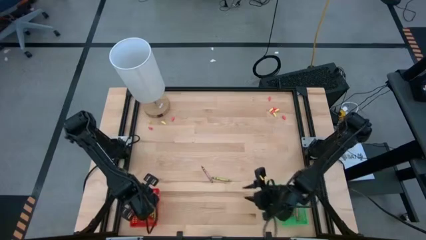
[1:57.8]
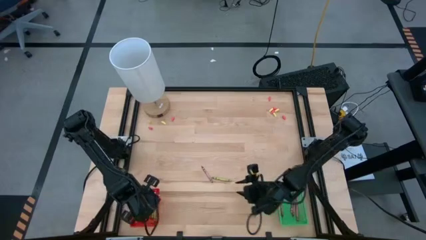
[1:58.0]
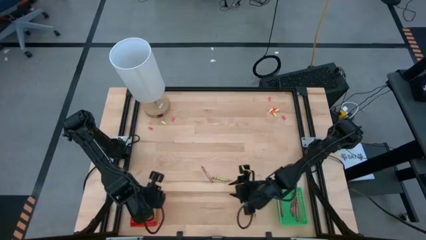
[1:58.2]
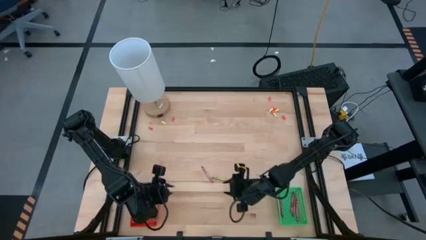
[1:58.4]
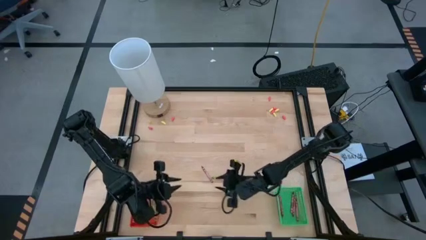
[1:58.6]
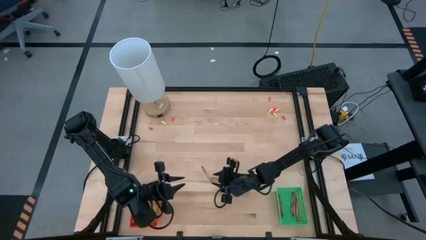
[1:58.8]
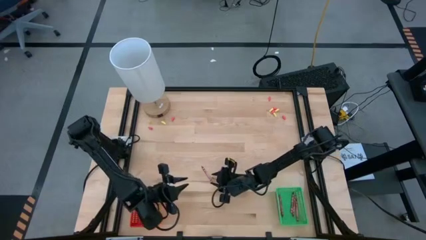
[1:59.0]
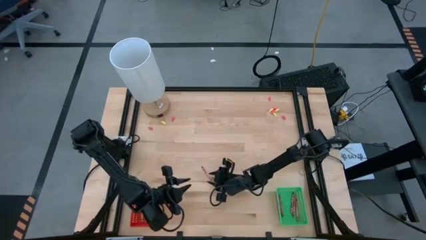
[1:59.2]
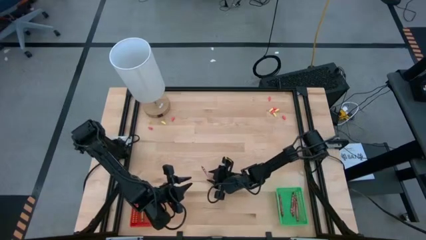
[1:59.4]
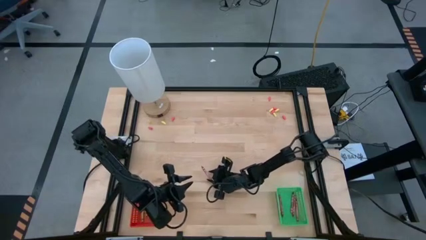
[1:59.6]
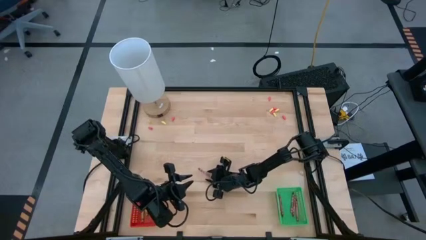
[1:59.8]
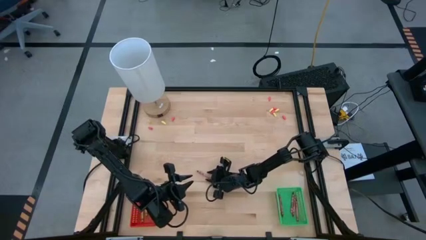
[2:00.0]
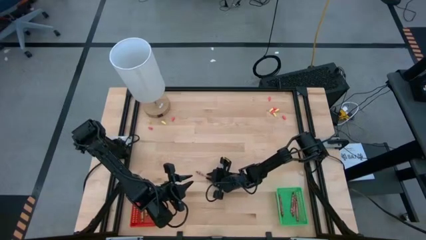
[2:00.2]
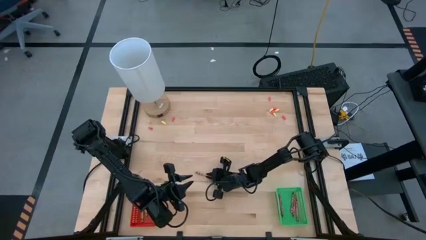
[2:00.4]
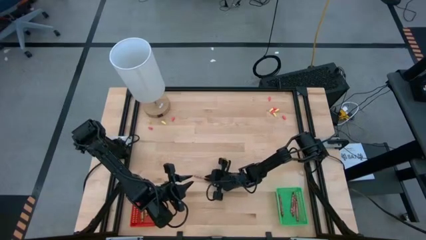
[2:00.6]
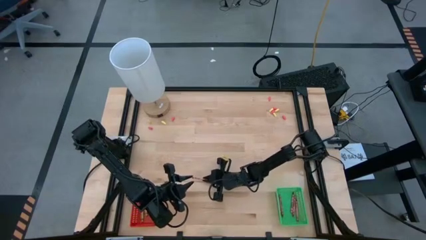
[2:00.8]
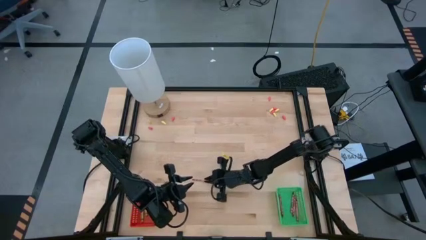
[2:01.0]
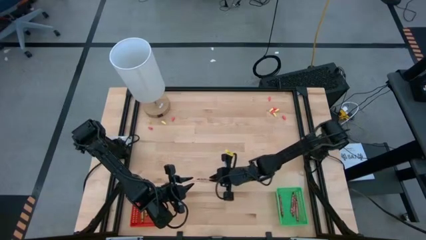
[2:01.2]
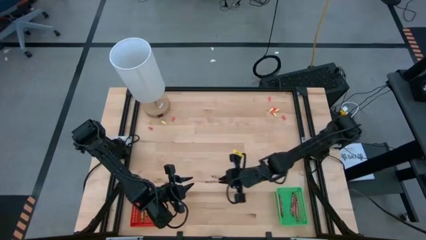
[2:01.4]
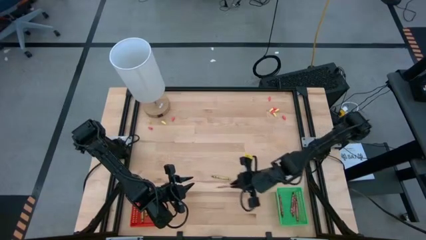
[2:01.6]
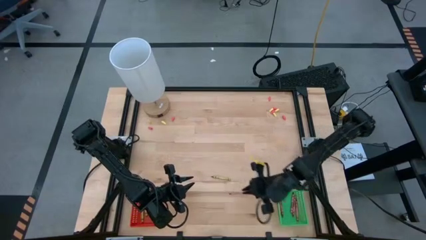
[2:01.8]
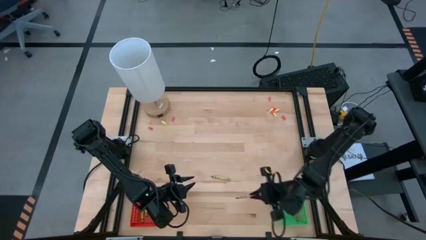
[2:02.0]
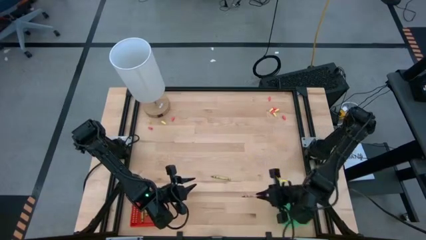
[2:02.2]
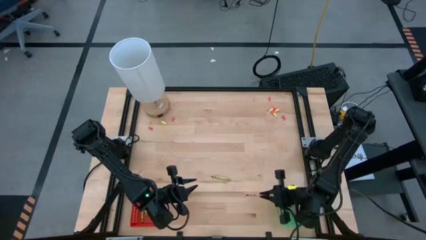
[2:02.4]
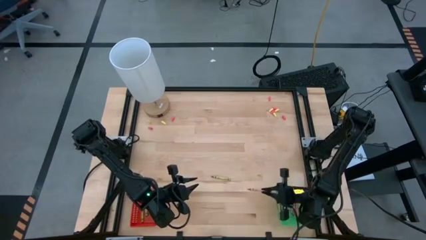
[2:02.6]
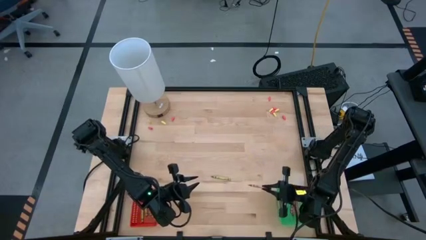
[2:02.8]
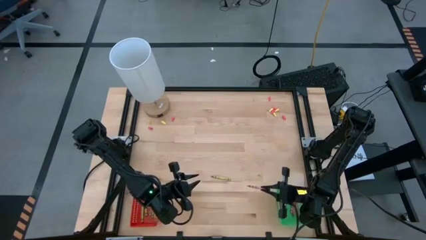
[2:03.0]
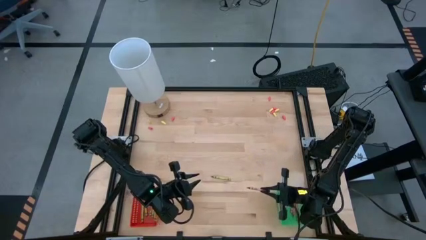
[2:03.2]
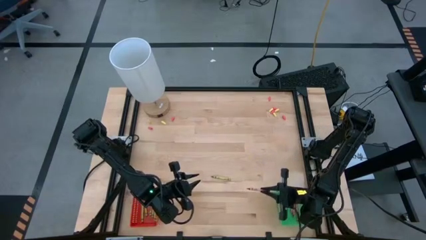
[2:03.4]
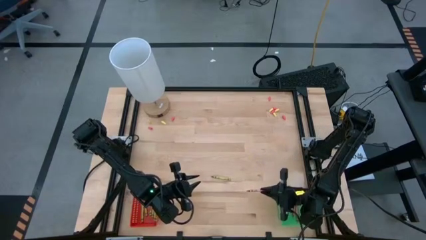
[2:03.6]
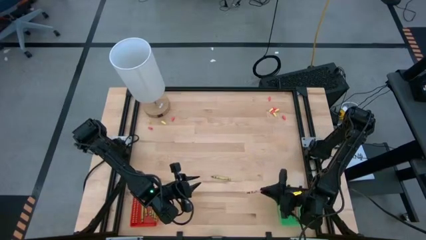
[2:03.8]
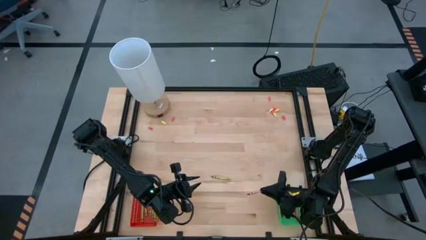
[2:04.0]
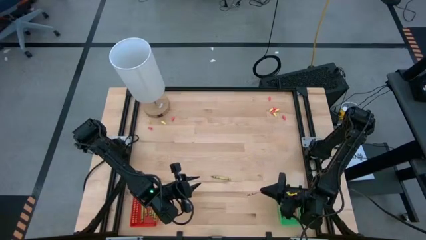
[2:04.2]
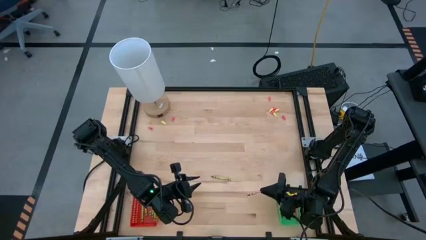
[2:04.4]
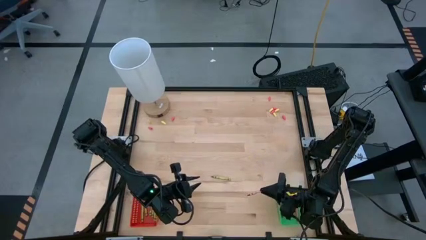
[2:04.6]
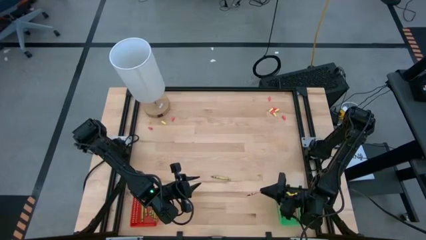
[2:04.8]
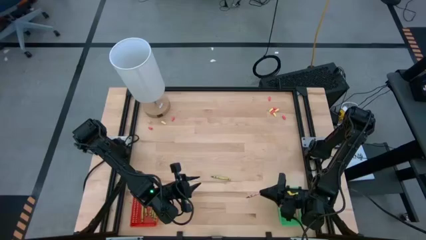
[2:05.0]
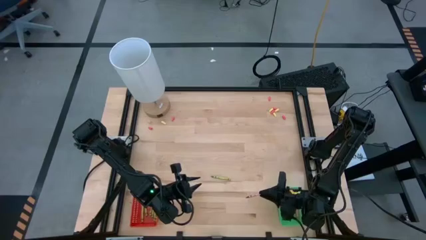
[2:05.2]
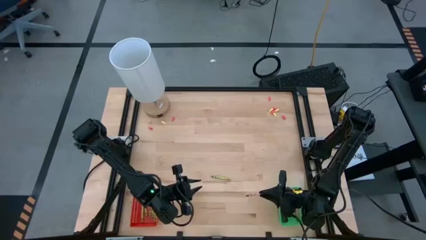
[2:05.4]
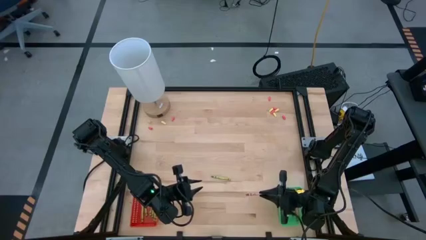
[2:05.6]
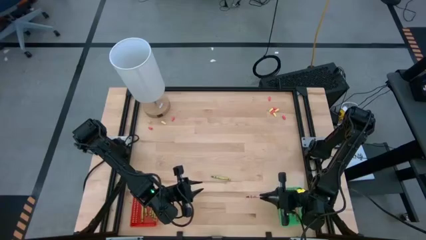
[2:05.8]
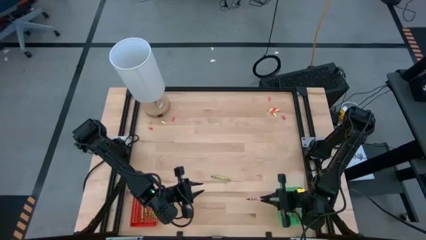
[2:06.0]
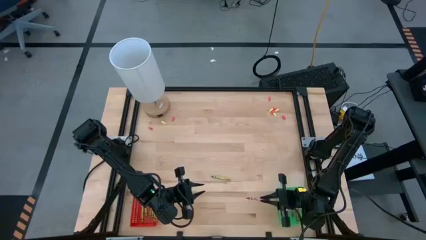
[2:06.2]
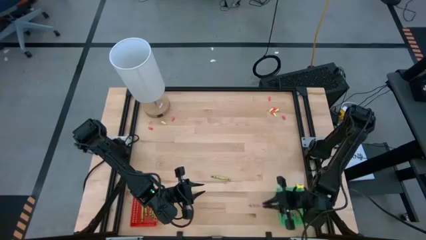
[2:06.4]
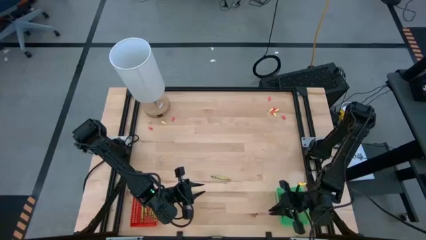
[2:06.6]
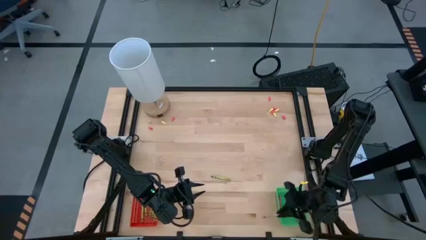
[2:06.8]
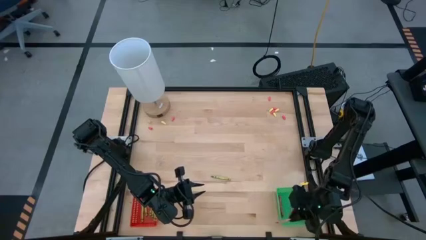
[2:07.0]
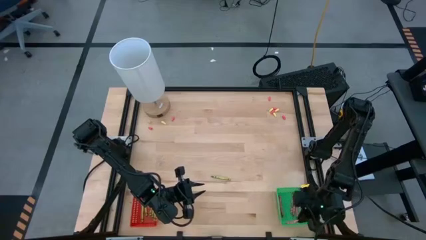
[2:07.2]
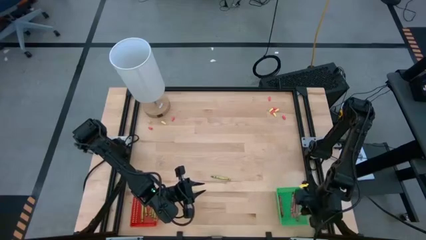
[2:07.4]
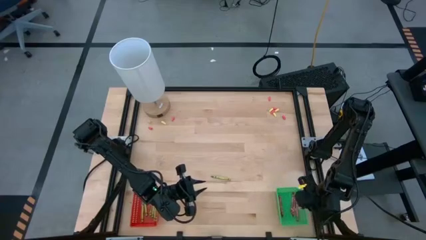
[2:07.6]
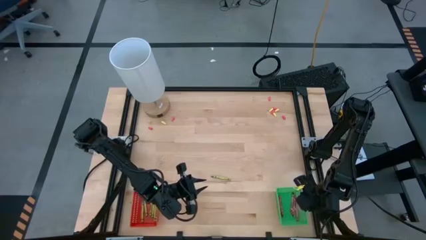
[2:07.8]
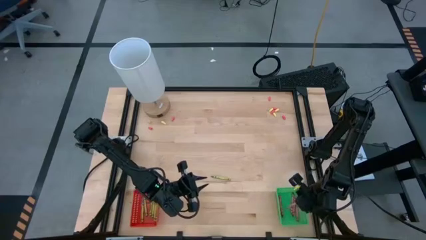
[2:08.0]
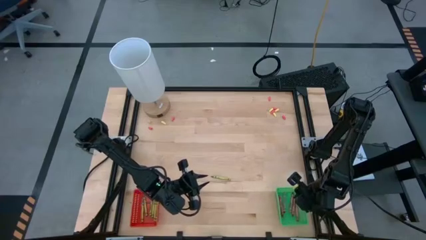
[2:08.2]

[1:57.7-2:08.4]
Task: Sort crayons
Put the red crayon into the green bin

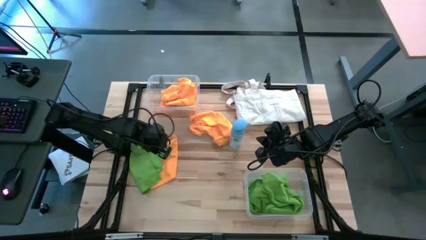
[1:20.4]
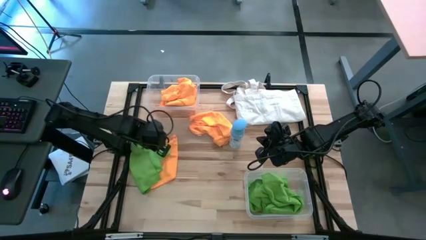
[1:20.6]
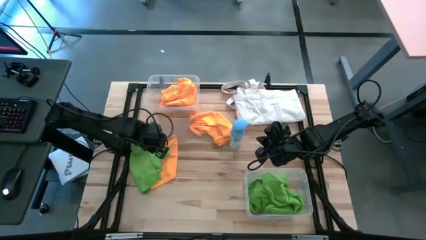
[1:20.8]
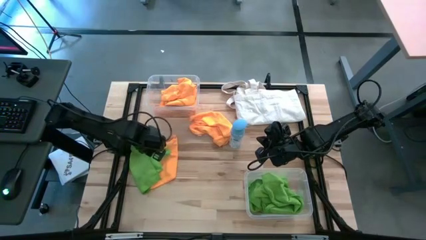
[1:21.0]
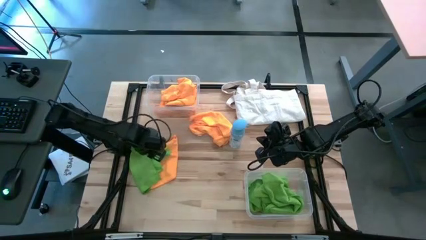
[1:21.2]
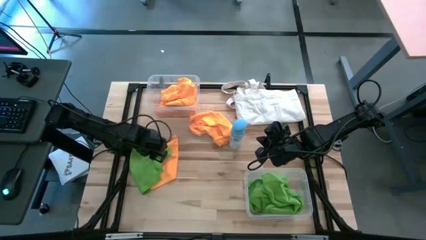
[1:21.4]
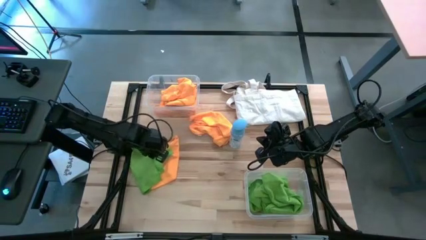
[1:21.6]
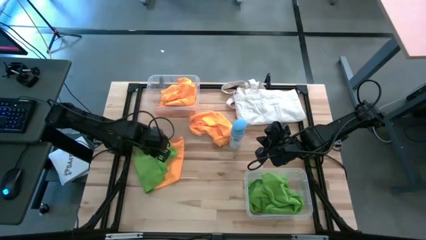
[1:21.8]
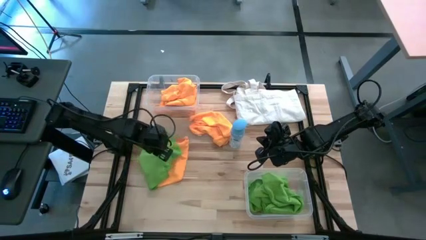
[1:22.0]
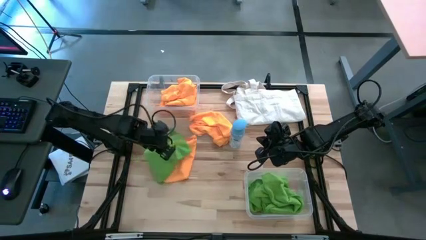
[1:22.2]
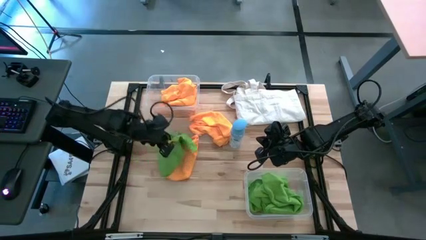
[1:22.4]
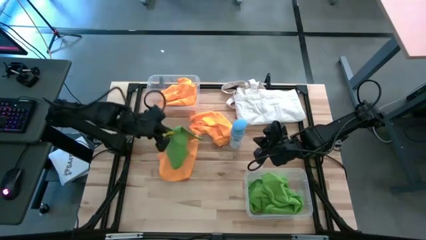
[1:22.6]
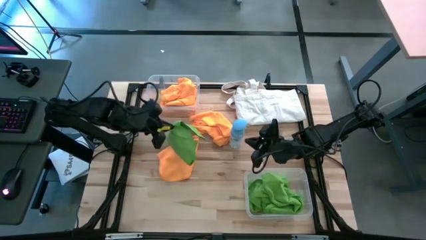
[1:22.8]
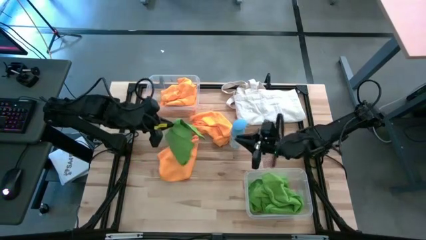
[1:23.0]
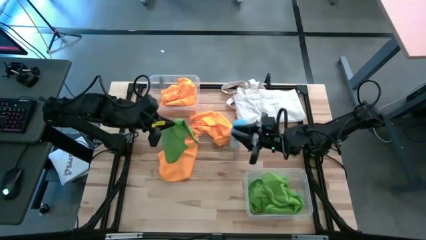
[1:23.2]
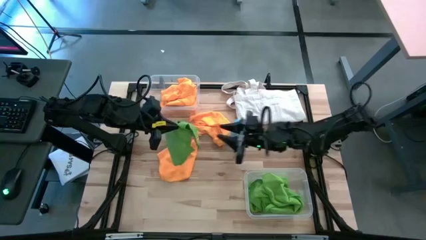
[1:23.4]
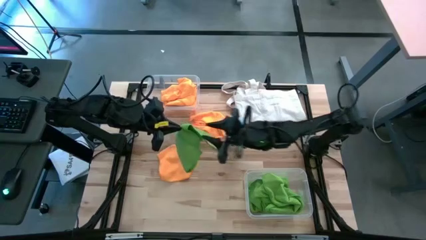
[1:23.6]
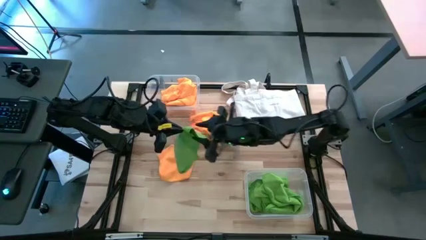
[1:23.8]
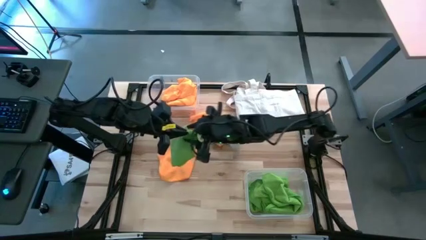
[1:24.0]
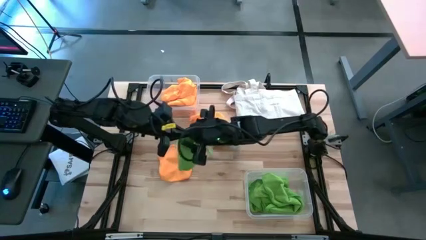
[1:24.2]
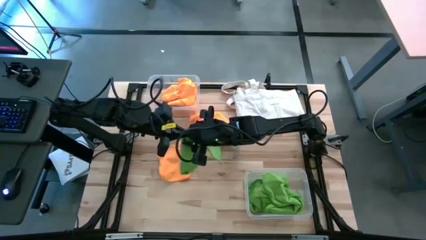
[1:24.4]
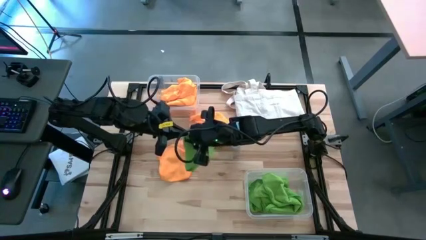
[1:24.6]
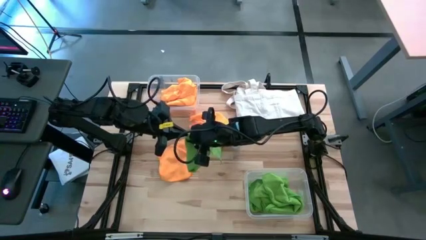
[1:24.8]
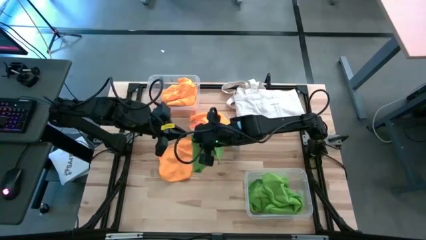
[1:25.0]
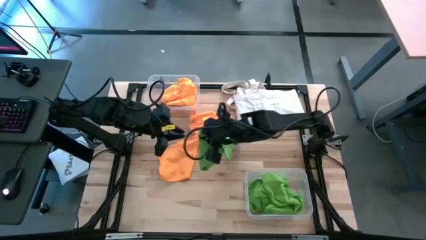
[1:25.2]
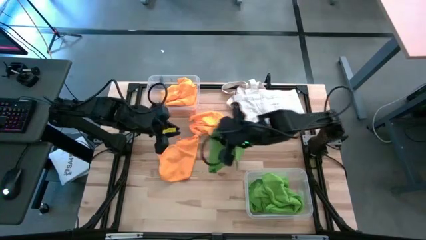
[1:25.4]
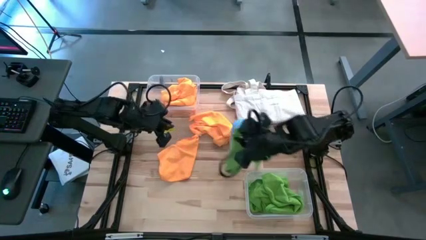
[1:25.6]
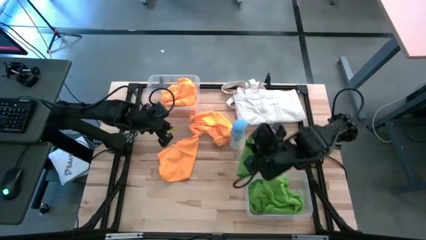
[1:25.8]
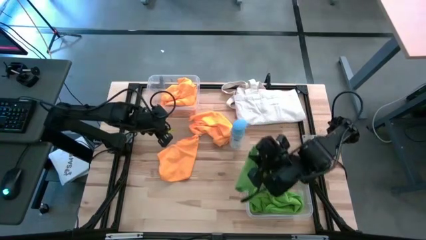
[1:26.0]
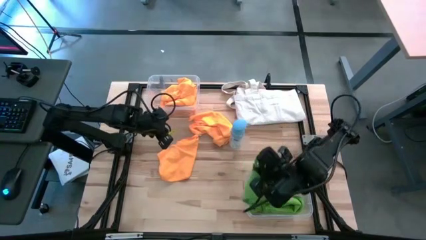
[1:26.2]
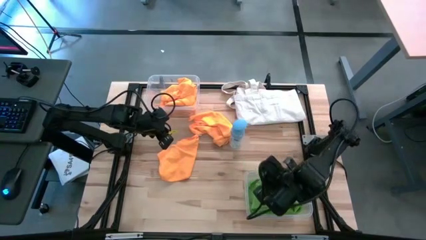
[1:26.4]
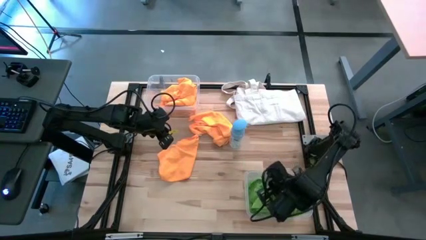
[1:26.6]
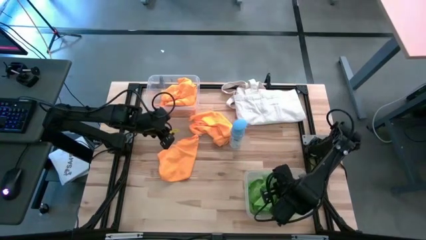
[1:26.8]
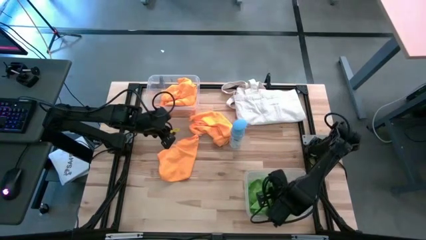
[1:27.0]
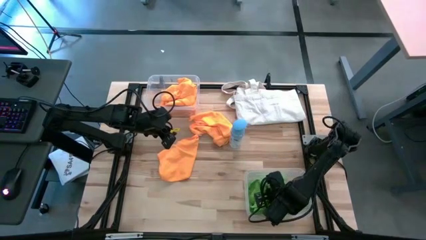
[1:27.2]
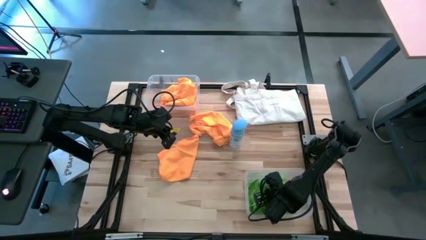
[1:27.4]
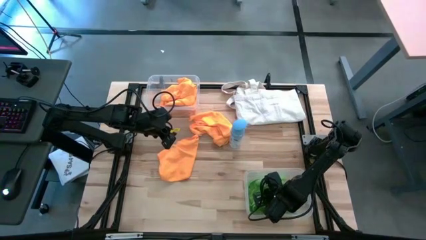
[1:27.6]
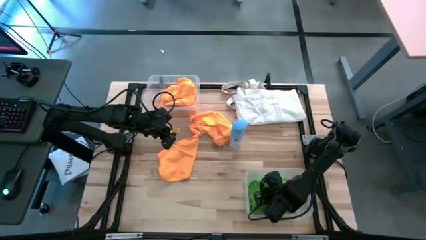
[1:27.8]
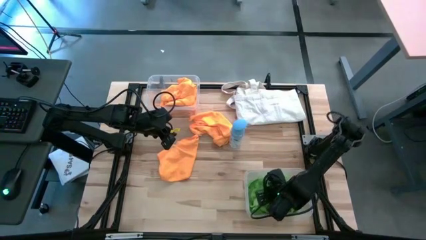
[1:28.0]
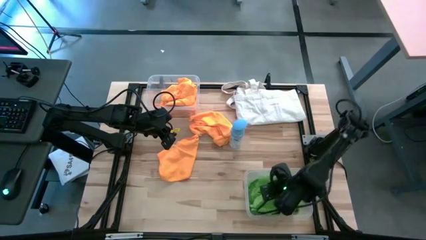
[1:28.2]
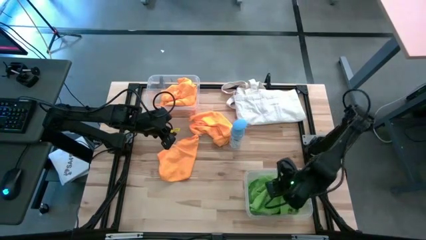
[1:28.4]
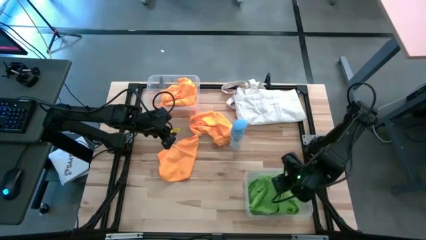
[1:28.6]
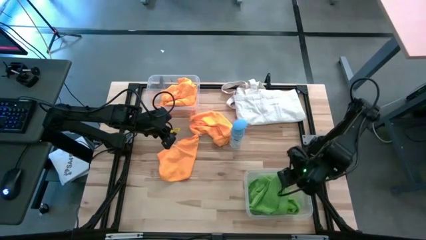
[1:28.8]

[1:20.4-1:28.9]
Task: Sort microfiber towel by color & place in baskets
Put the green microfiber towel into the bottom transparent bin
